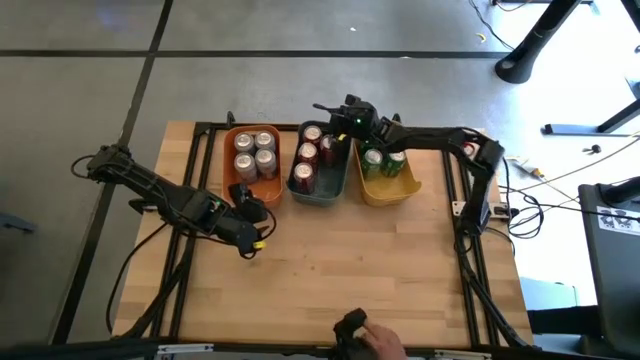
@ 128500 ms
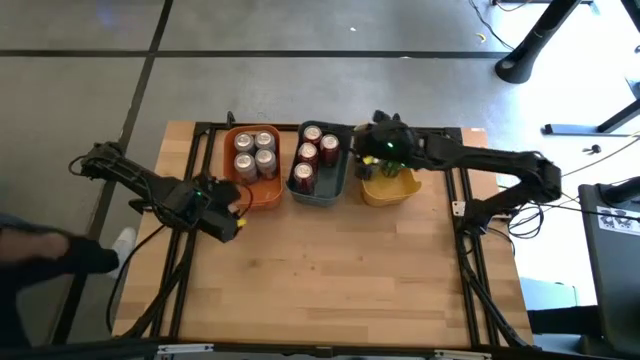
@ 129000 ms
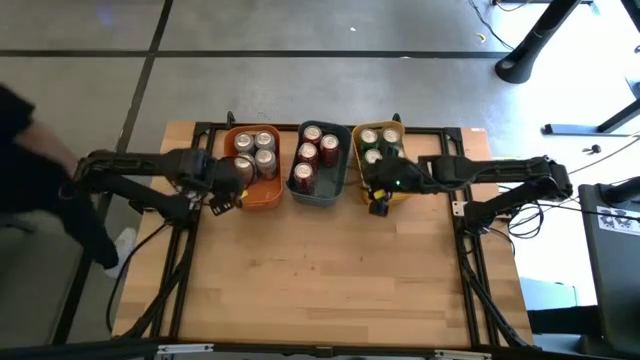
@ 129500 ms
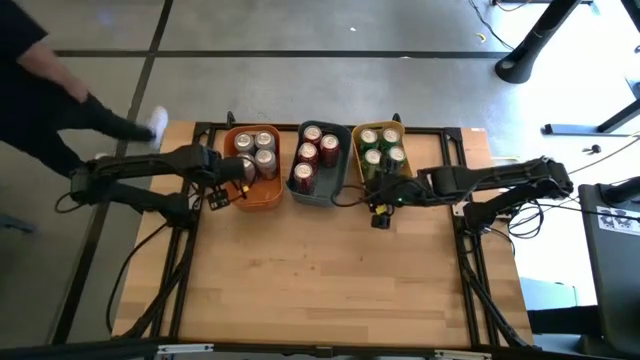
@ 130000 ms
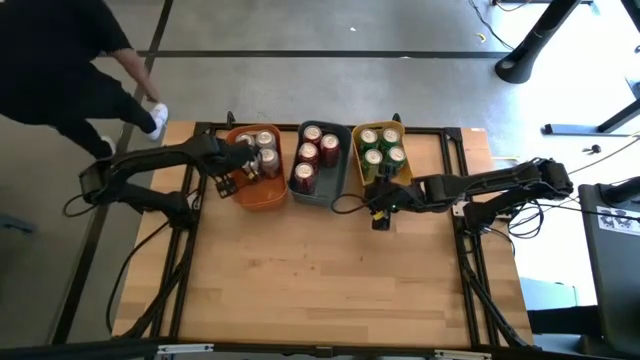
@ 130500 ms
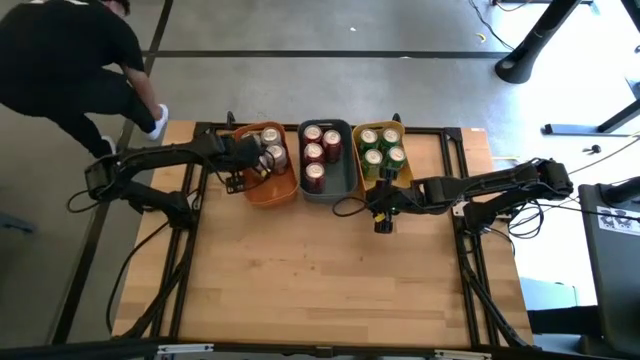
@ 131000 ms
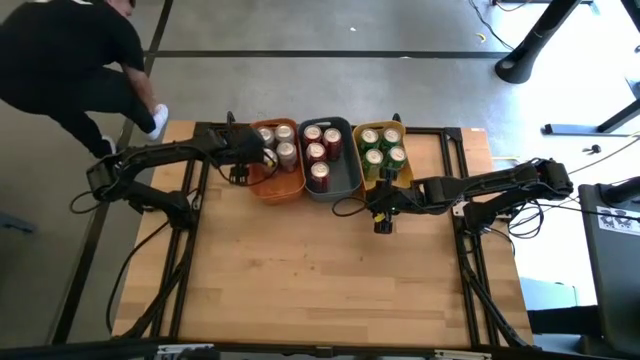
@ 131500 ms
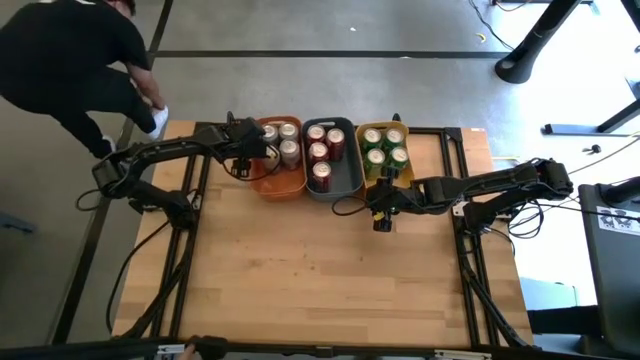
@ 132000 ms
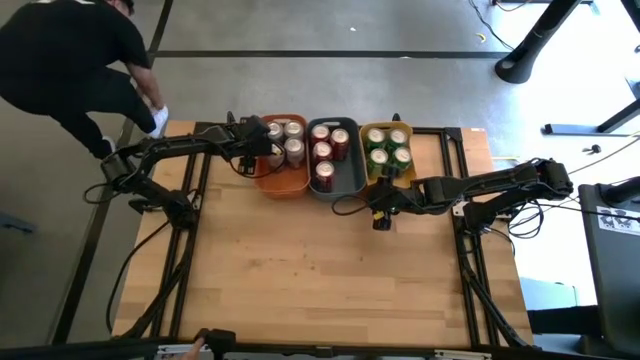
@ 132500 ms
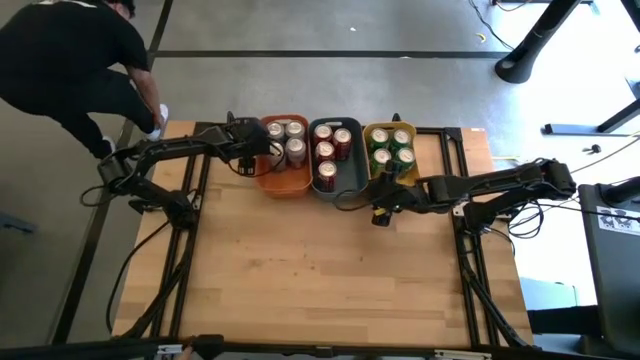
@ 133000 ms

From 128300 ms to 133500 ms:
Task: Sort soda cans
Move the bins close to each other

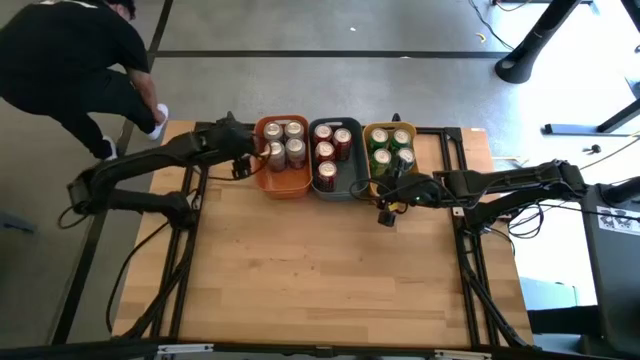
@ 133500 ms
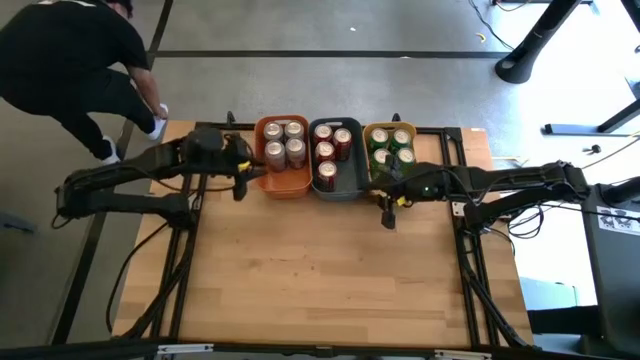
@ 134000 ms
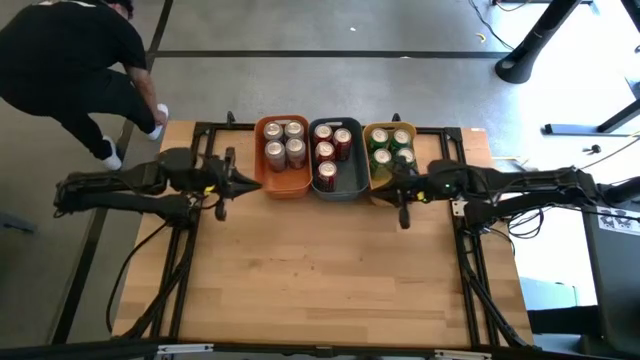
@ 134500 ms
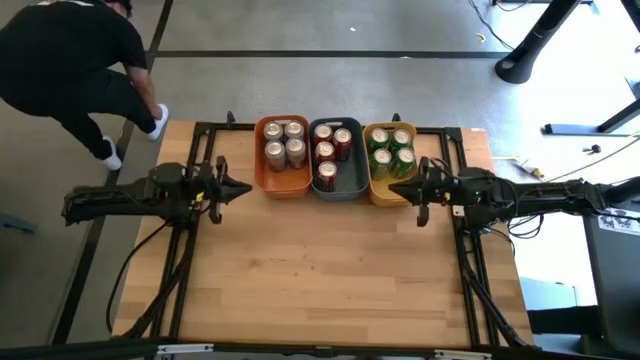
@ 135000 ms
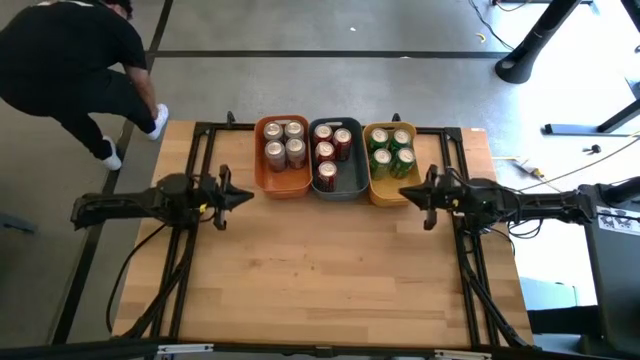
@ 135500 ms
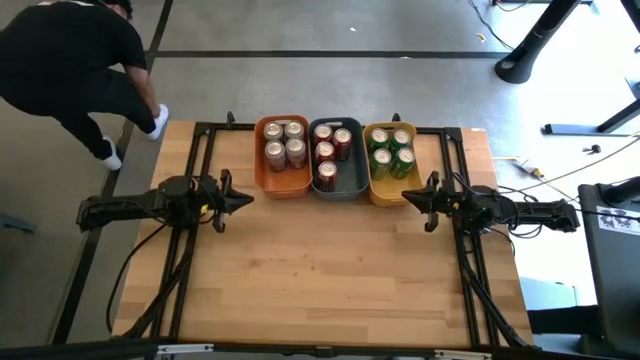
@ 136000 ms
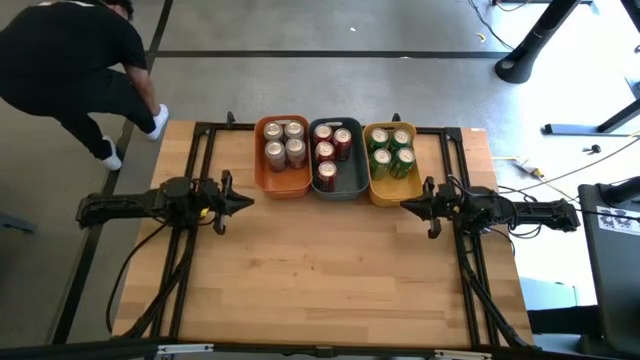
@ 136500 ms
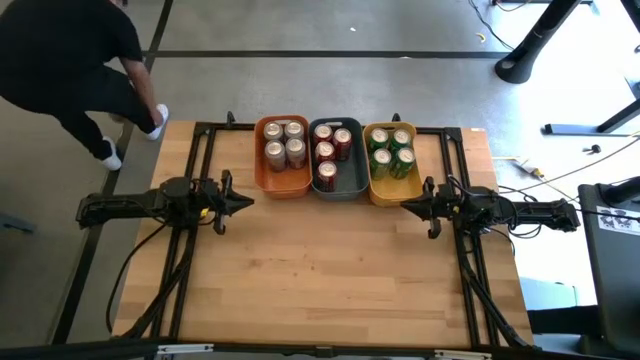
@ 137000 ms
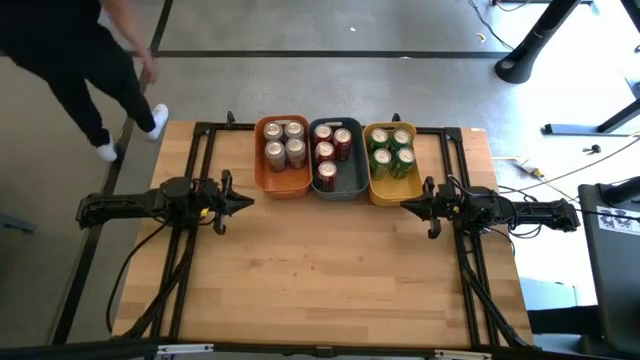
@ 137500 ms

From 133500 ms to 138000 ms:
Return to Home Position

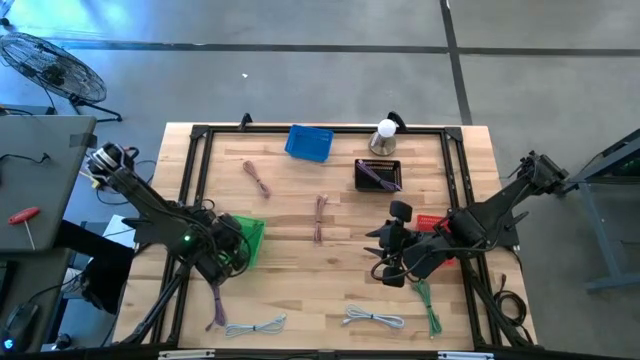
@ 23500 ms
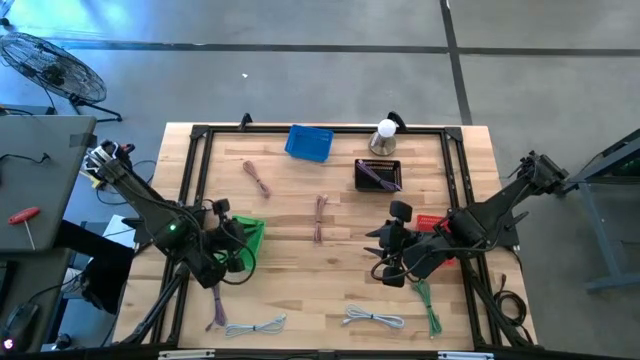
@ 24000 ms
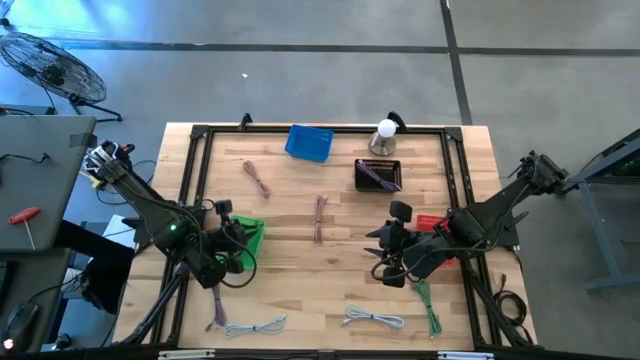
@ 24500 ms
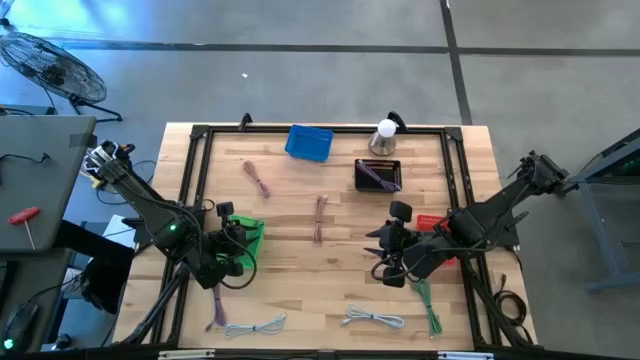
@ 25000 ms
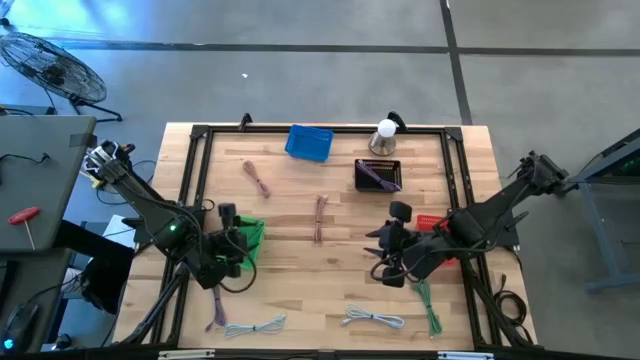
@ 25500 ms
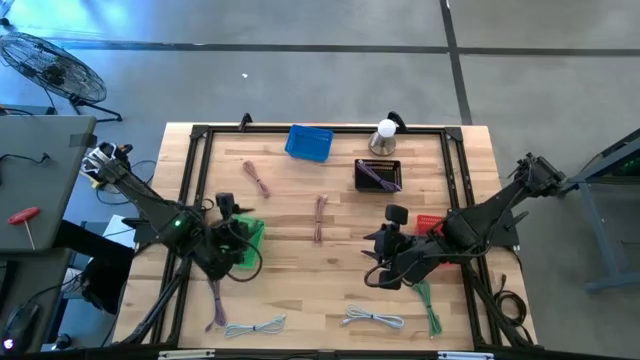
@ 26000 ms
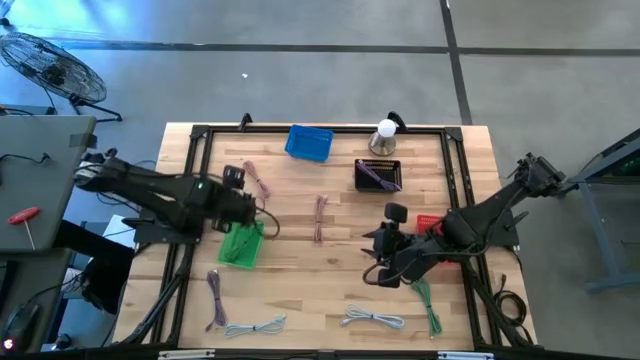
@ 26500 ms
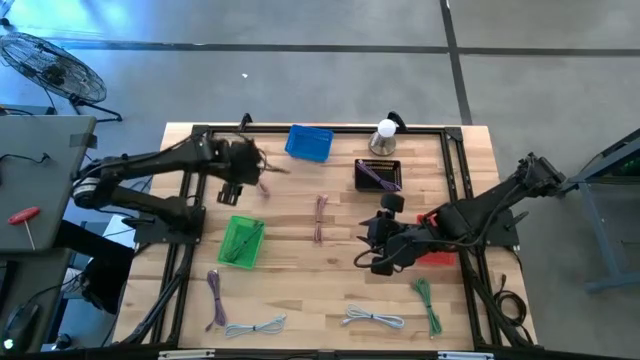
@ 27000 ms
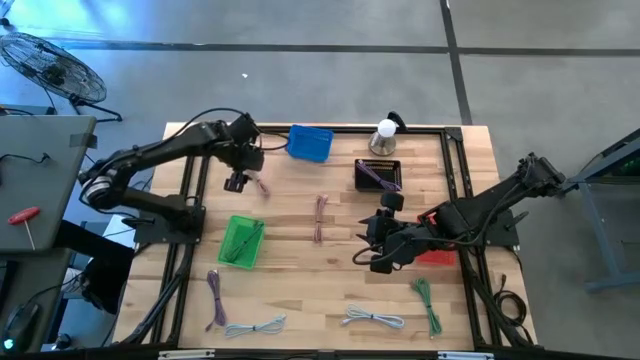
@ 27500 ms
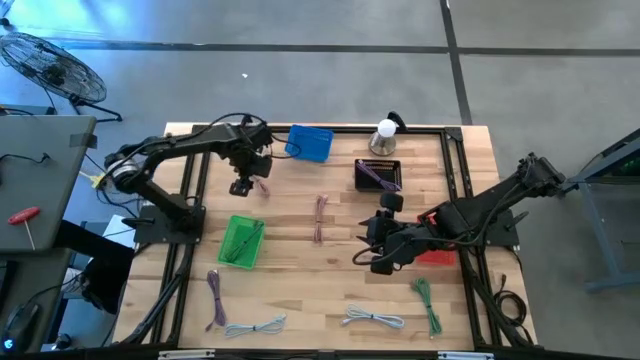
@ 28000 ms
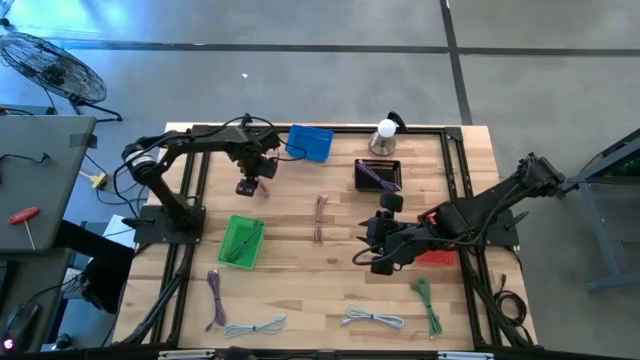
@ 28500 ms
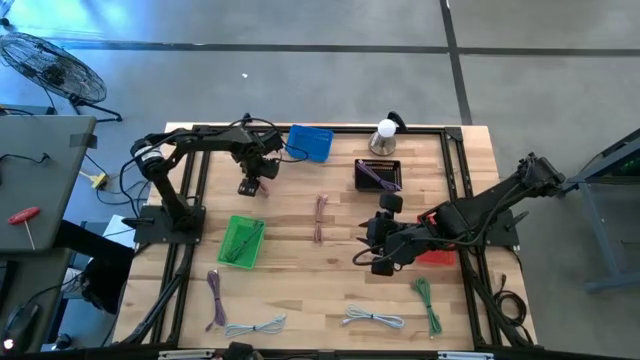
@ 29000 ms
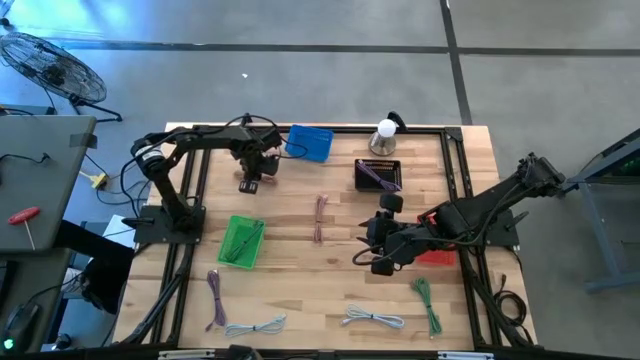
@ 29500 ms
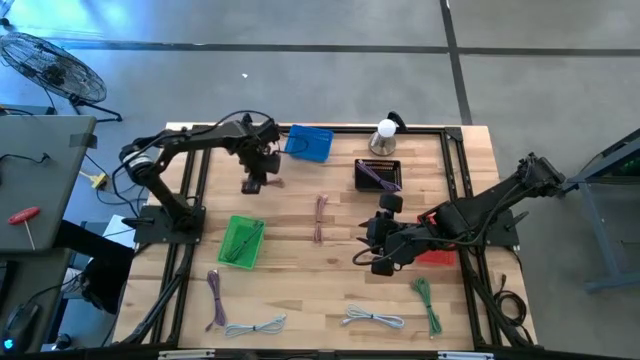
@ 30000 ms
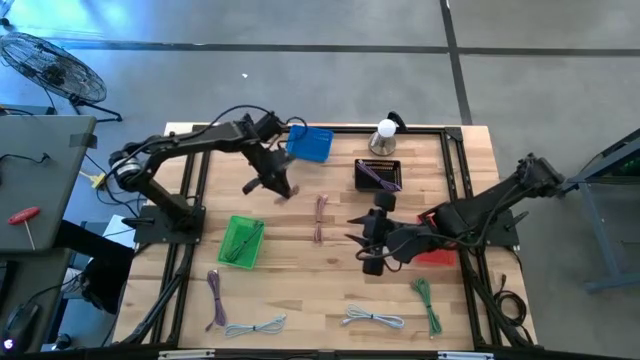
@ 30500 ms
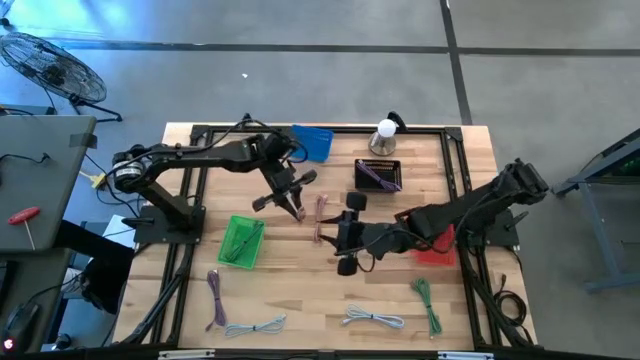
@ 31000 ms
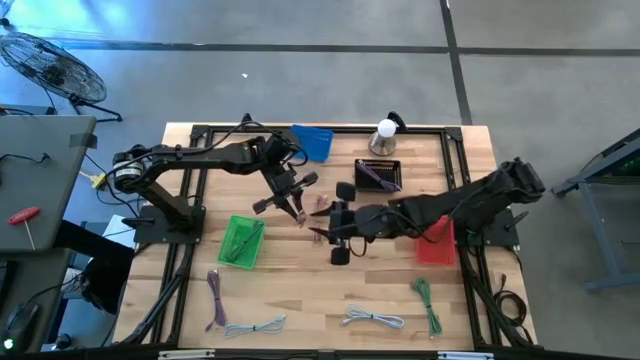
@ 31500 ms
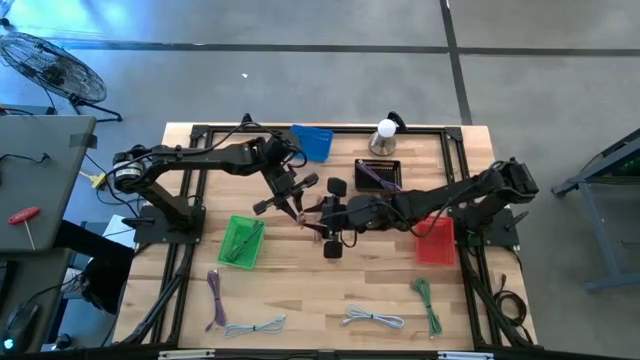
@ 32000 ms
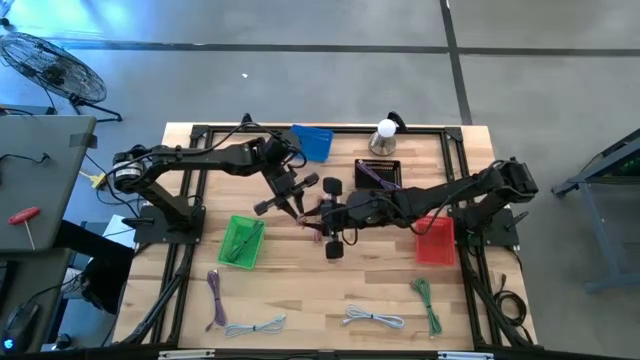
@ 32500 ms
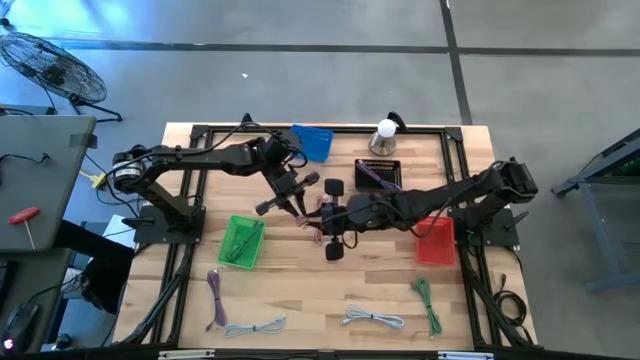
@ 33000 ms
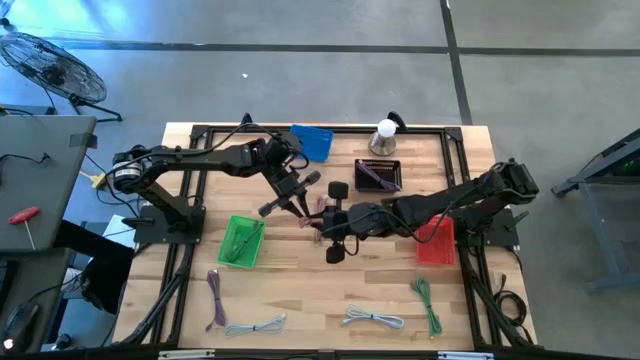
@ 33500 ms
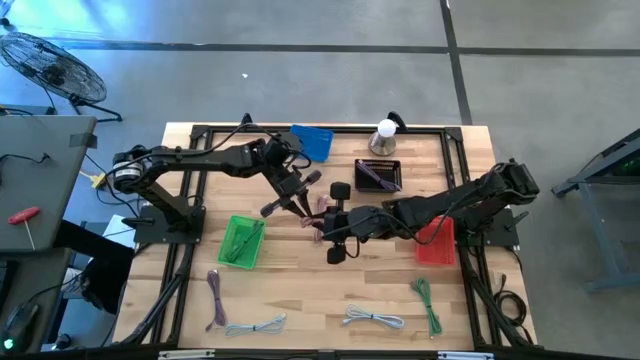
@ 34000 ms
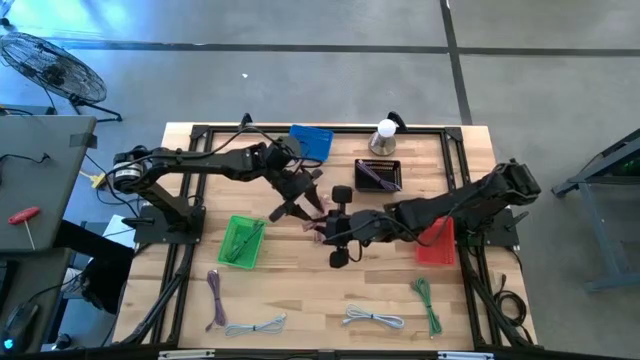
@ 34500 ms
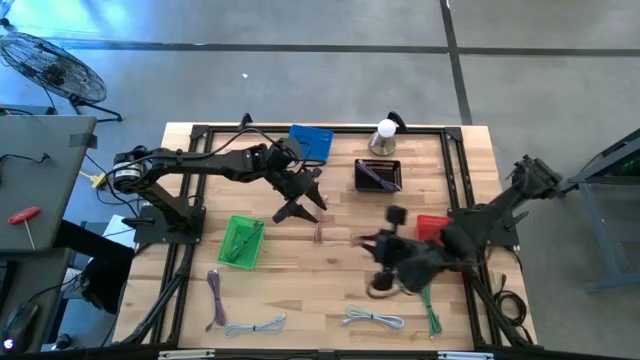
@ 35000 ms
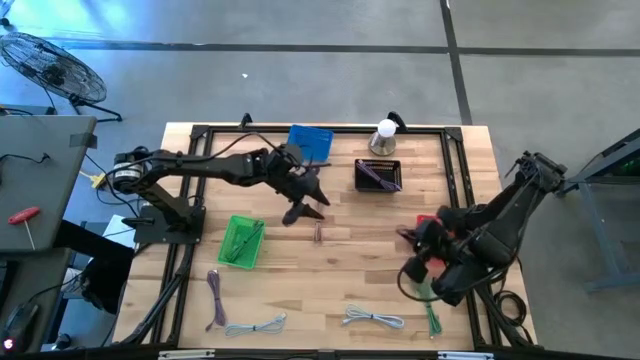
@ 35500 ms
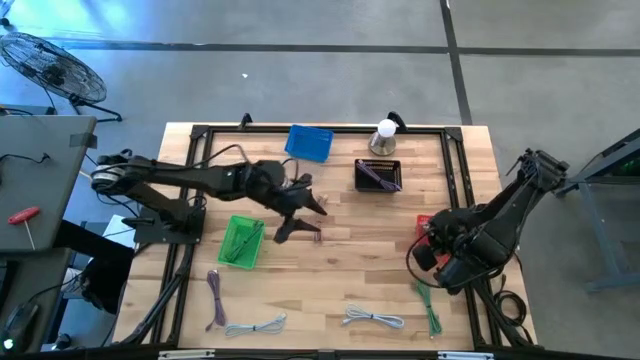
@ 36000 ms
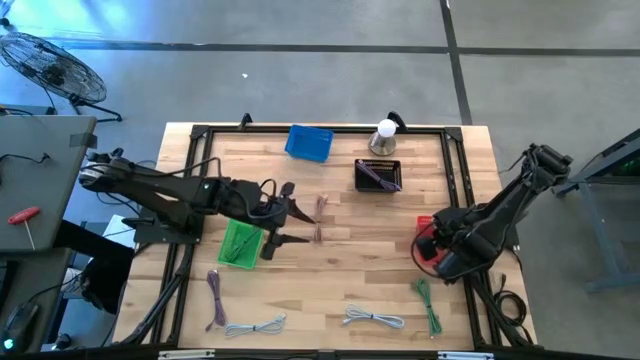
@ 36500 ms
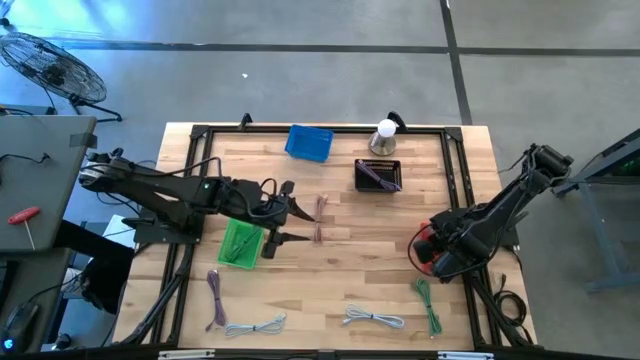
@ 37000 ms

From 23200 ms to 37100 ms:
Task: Pick & Place USB Port
Put the top pink charger cable into the red bin
